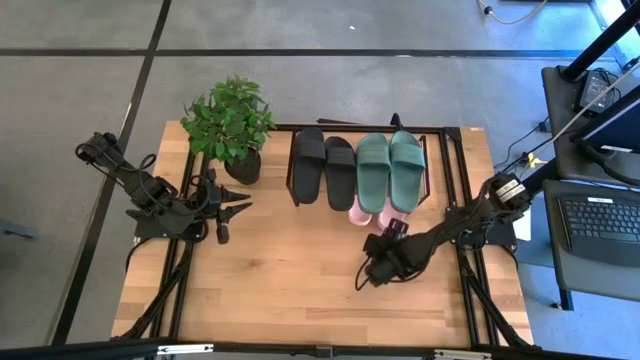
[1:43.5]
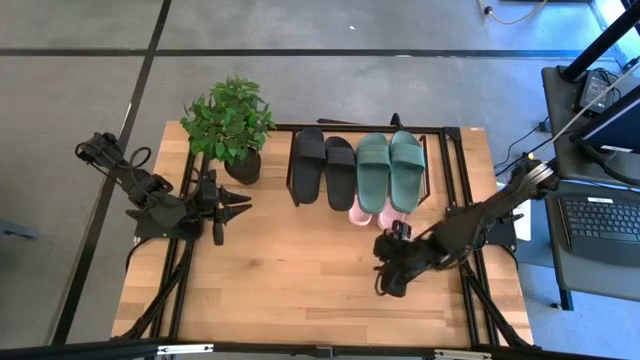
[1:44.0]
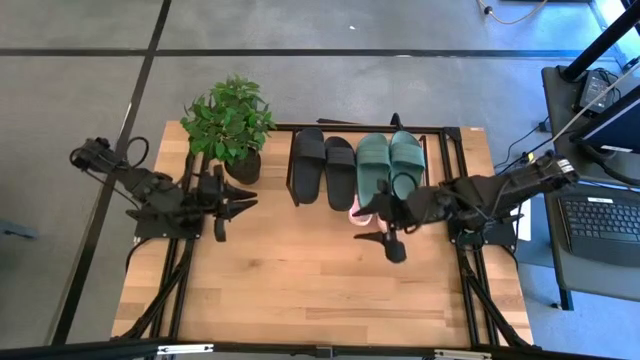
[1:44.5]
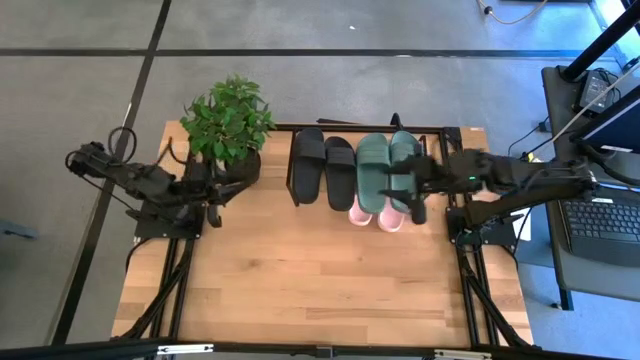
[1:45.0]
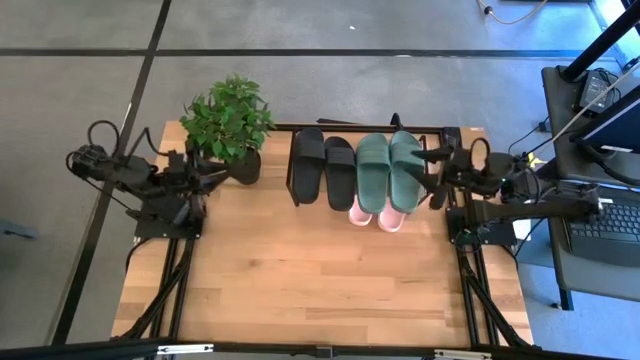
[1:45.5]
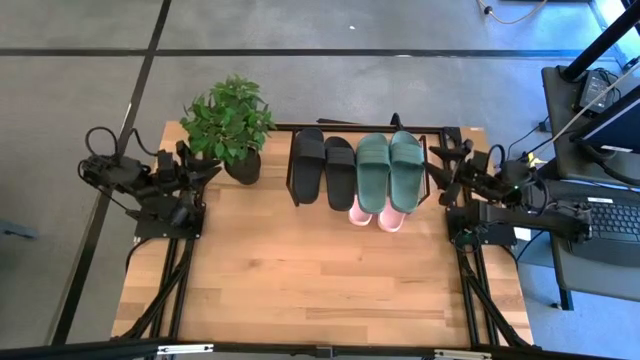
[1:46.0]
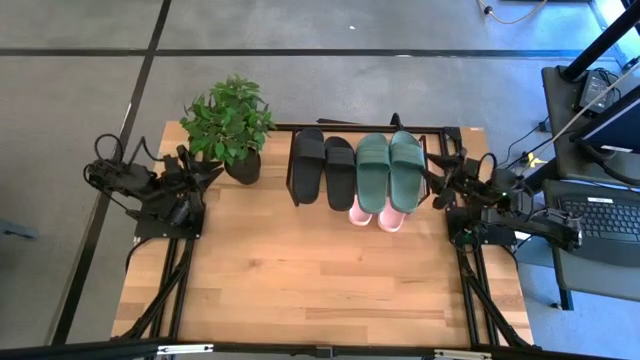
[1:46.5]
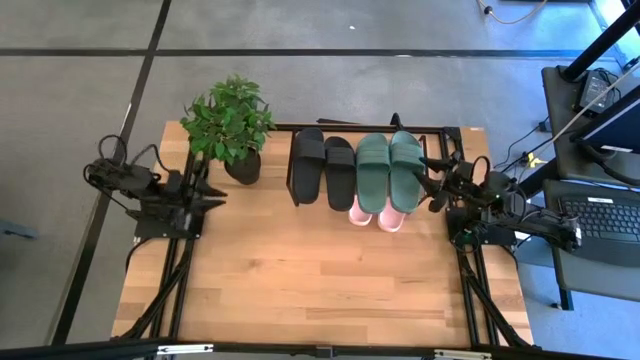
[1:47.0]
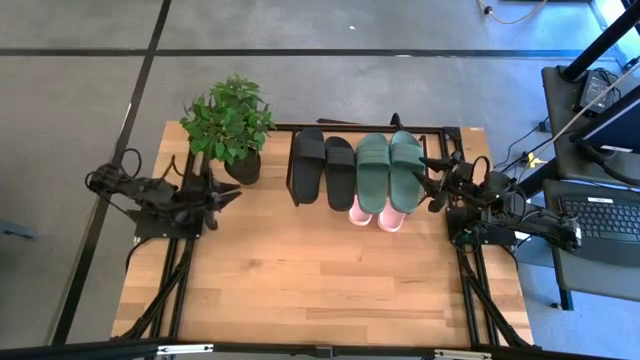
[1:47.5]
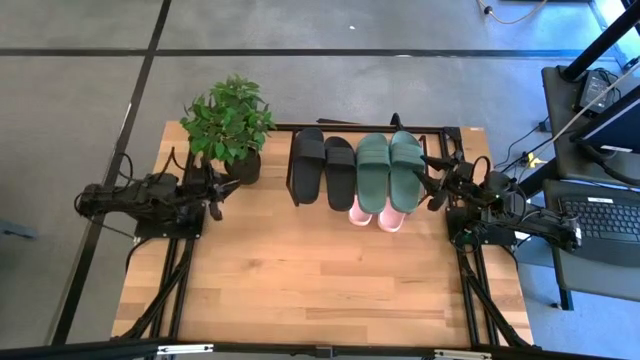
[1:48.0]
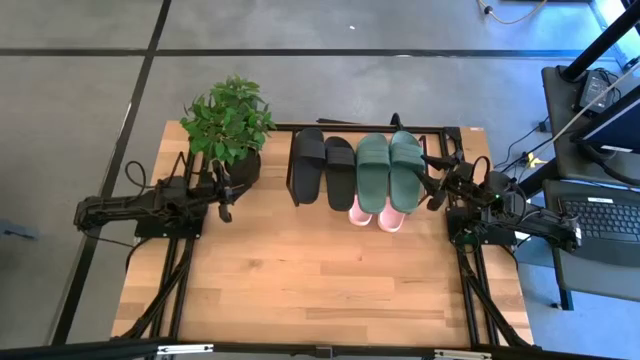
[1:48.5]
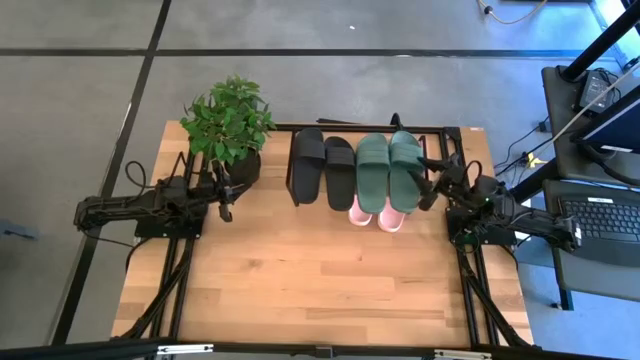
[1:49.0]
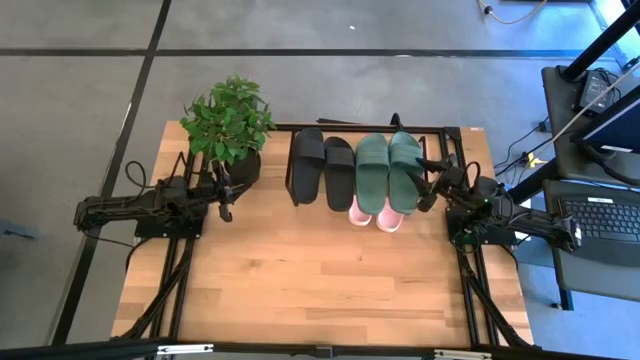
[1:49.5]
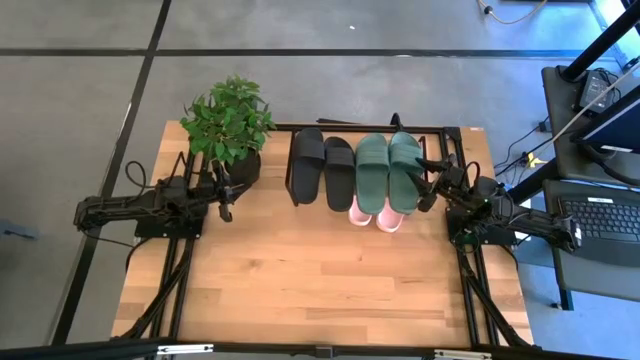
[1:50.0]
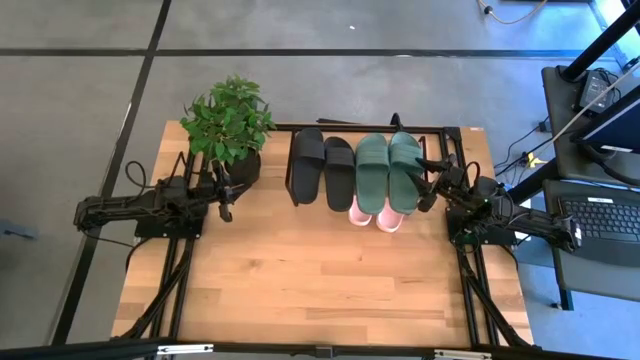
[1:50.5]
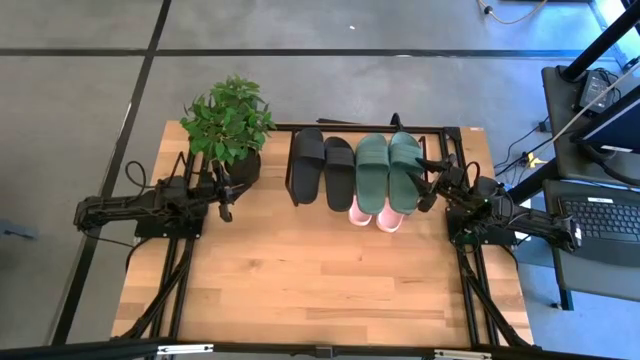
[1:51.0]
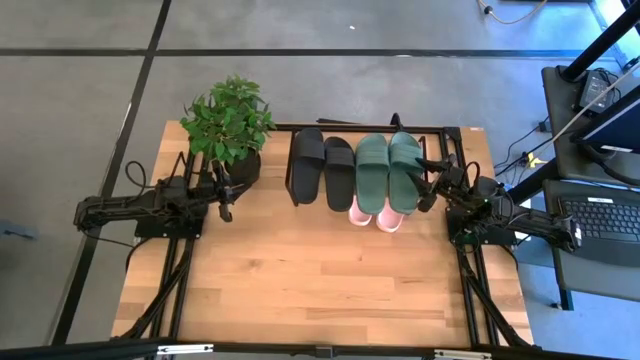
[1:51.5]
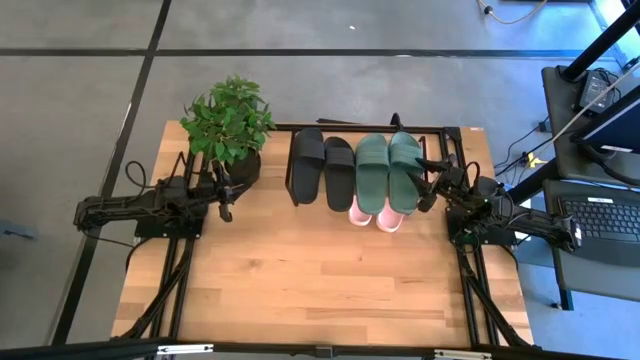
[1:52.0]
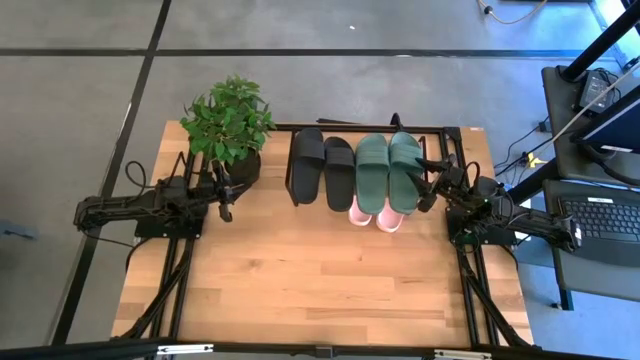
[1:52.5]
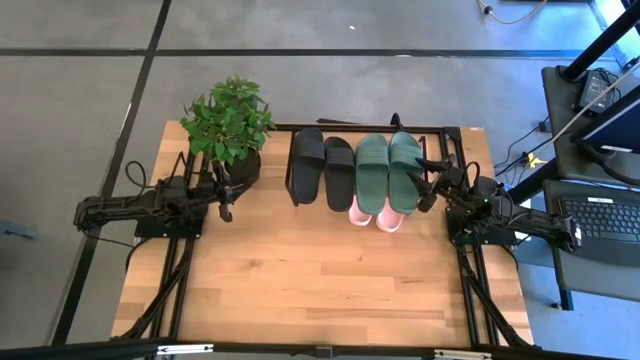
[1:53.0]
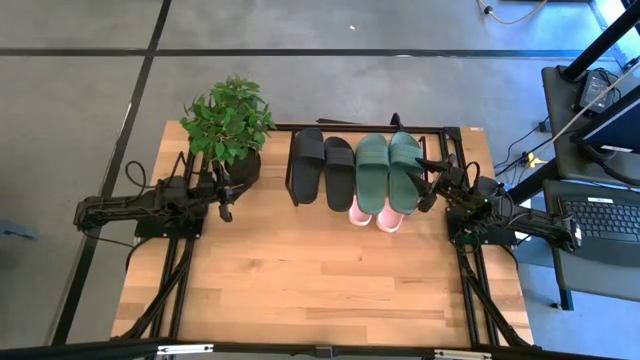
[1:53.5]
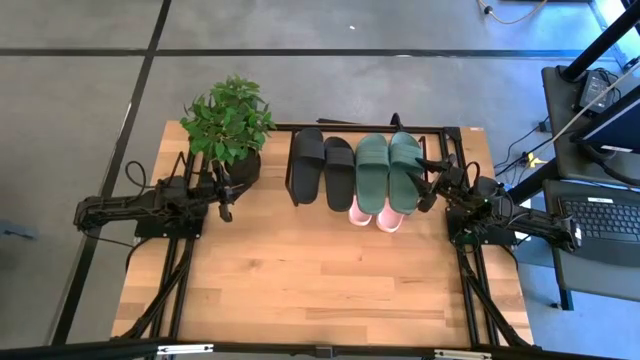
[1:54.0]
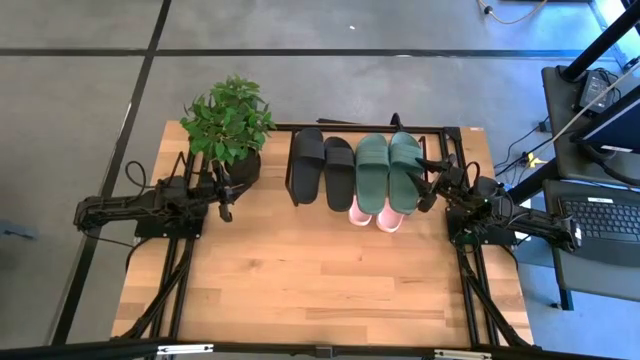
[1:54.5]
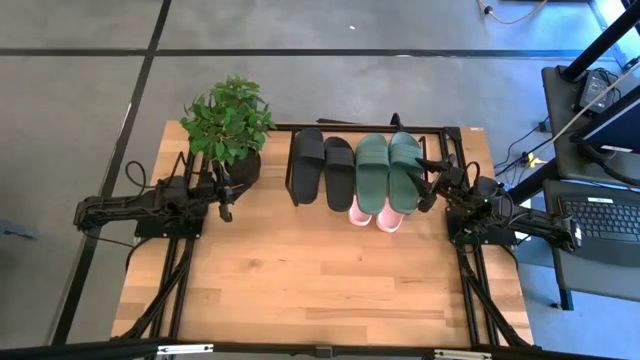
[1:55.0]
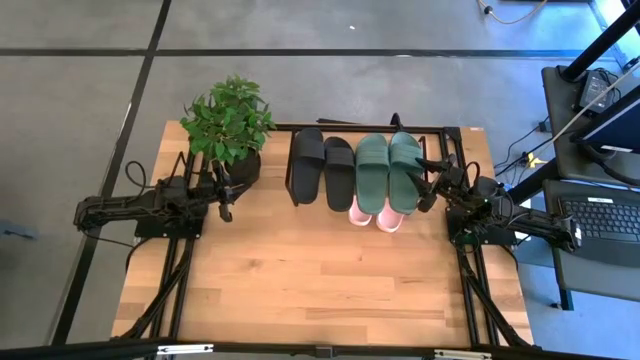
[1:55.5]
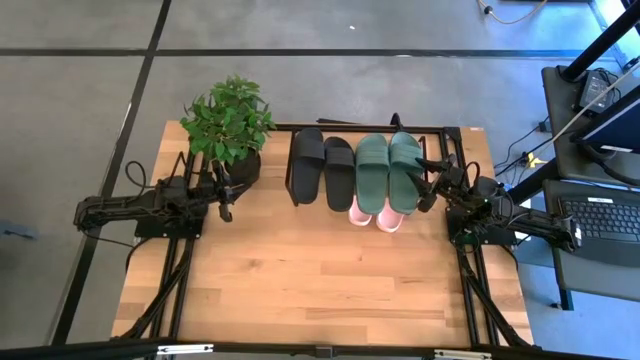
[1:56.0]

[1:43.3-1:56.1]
Task: Pick and place slides into the shelf
Return to Home Position

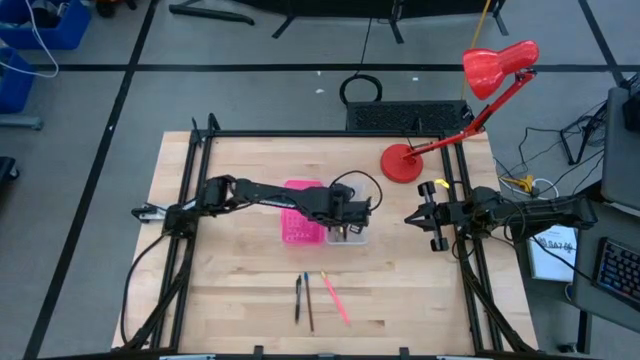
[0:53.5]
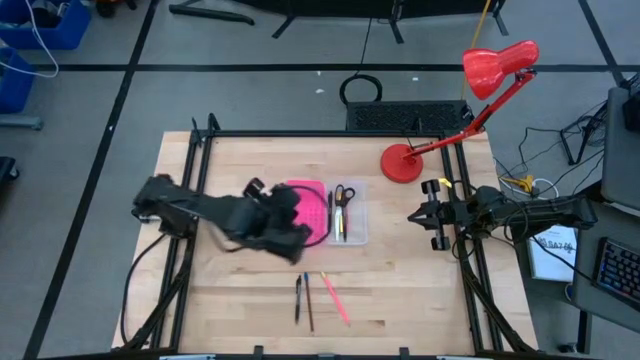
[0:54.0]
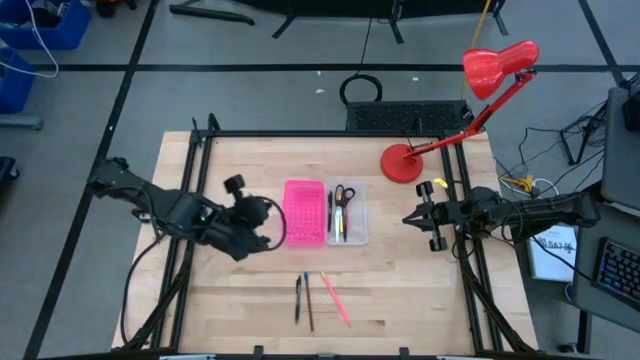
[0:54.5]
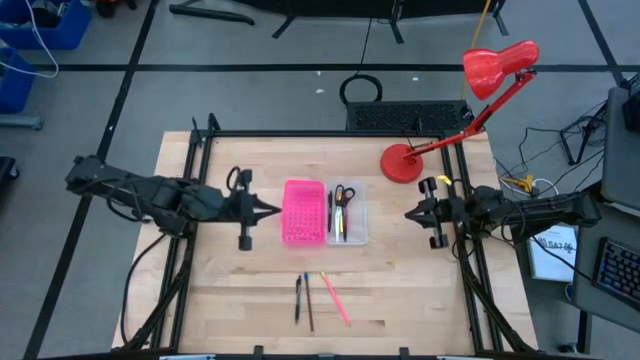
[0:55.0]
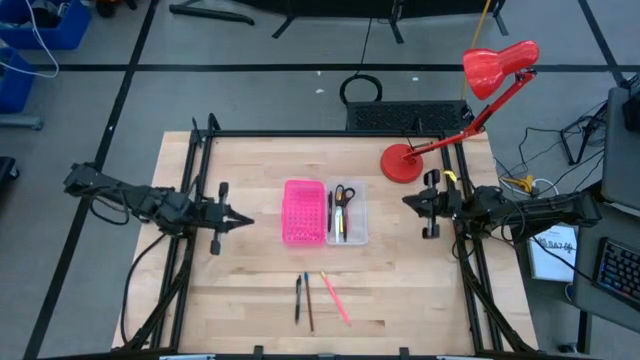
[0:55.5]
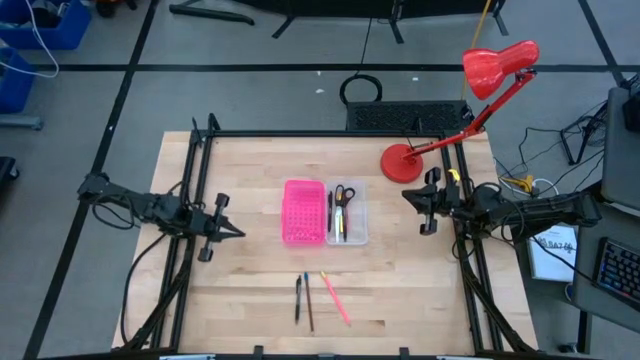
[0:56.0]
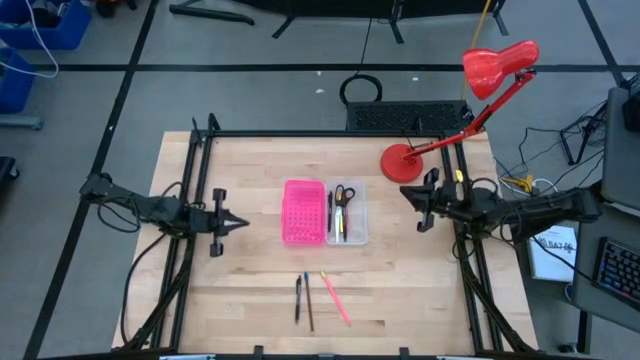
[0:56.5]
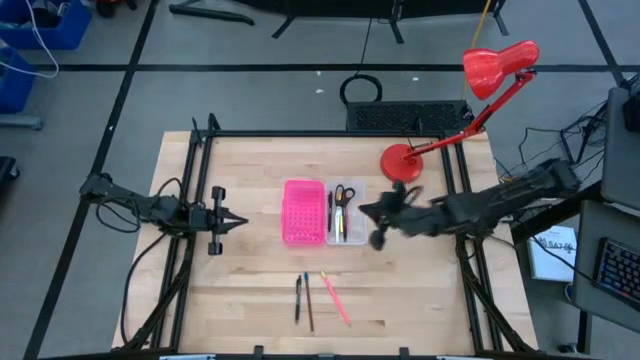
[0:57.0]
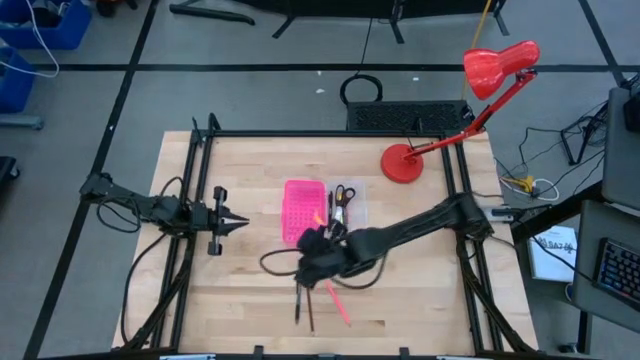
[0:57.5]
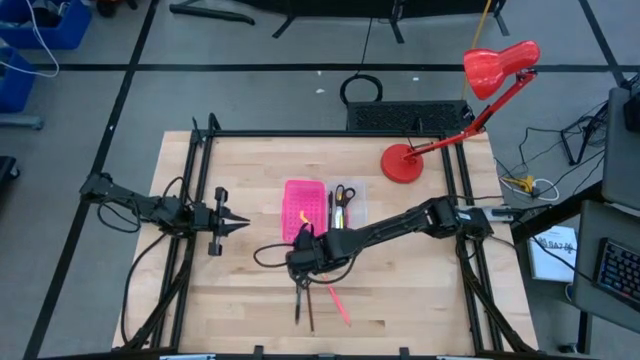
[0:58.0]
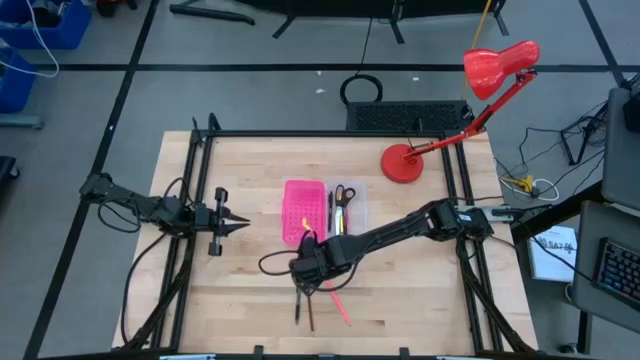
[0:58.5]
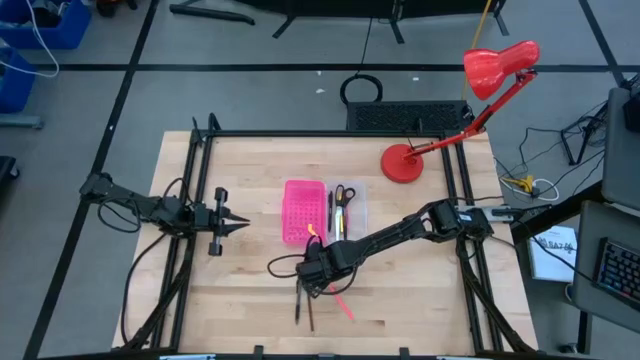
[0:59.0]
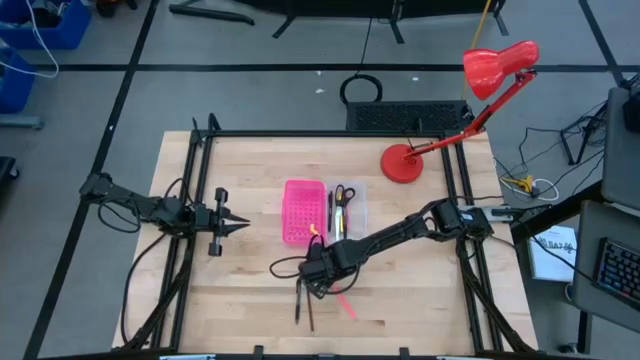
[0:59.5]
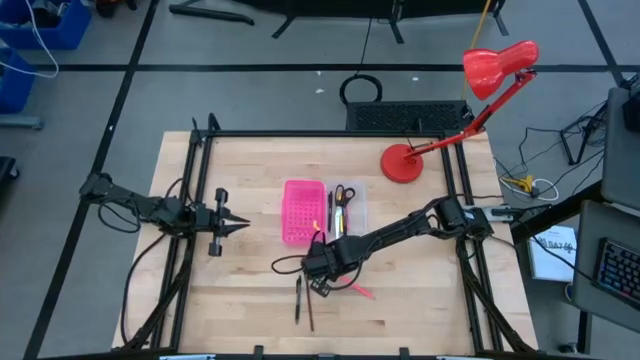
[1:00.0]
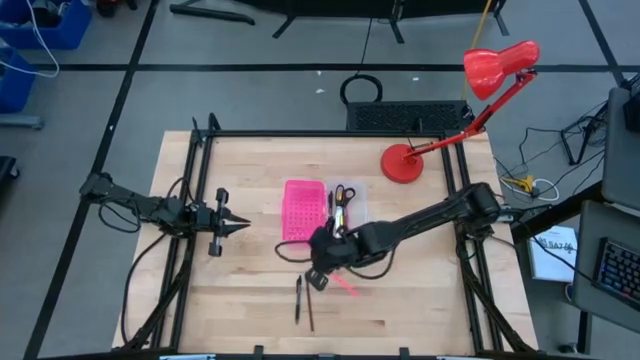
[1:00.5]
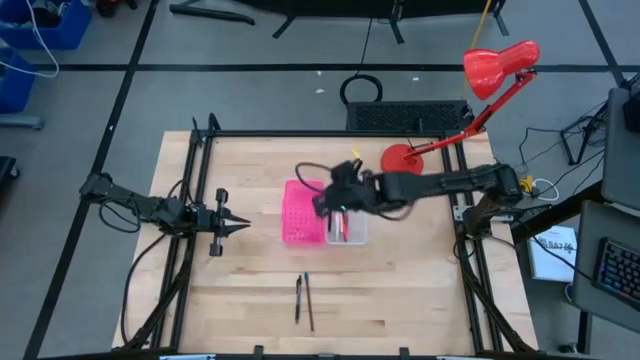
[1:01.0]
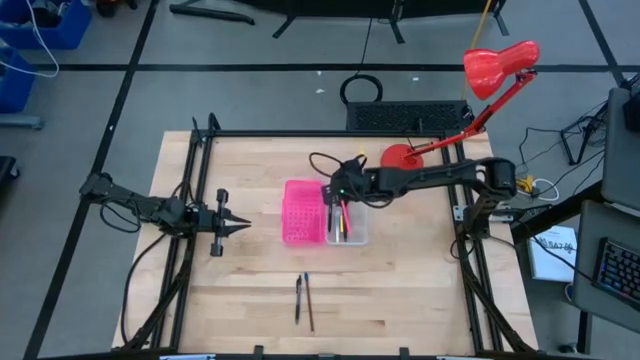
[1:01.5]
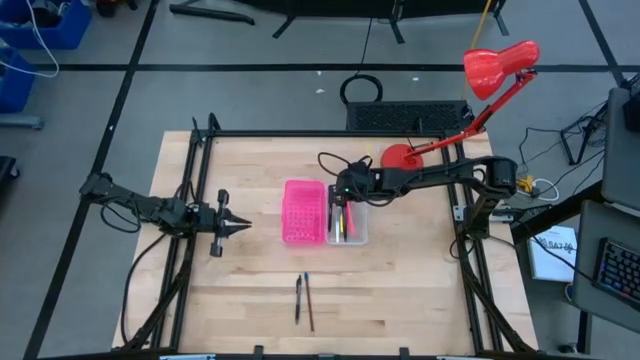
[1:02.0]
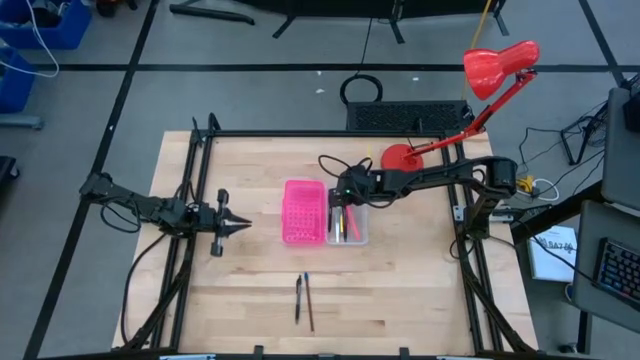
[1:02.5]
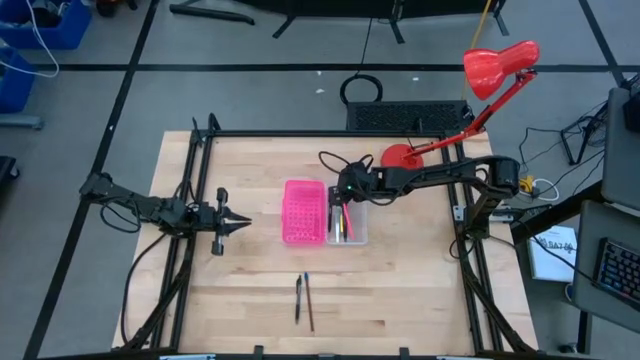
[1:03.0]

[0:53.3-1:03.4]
Task: Pick & place school supplies into a supply box
Put the pink pencil into the supply box
